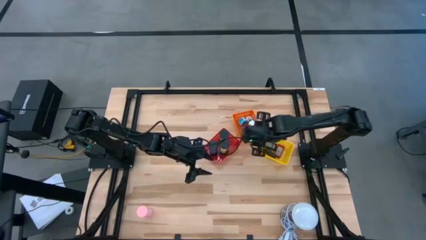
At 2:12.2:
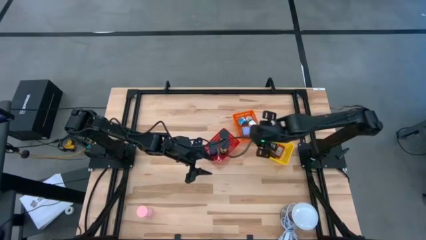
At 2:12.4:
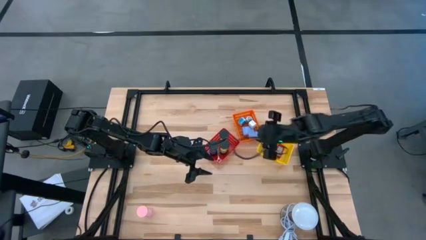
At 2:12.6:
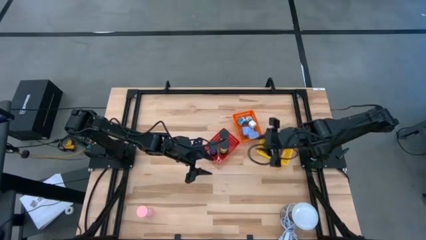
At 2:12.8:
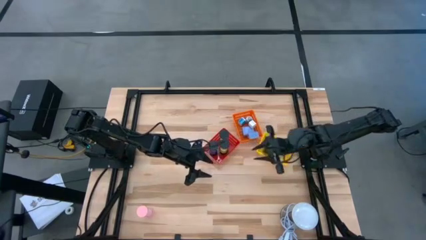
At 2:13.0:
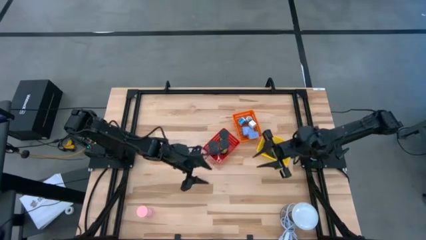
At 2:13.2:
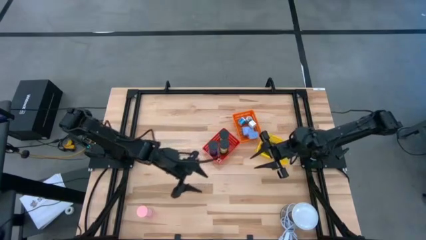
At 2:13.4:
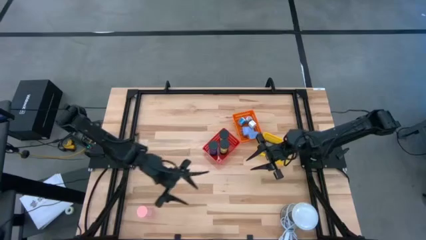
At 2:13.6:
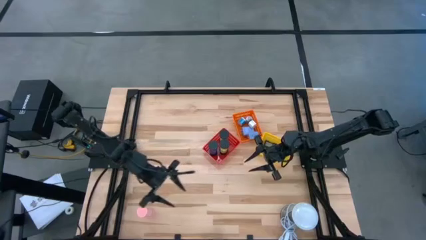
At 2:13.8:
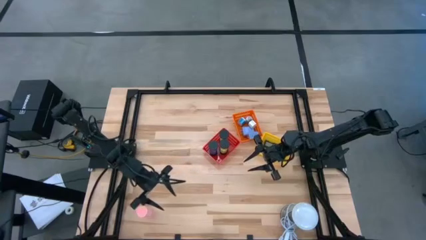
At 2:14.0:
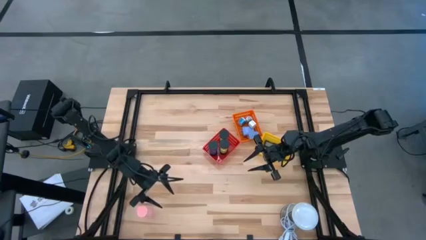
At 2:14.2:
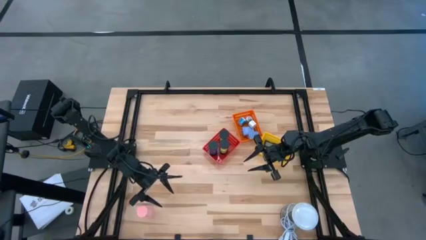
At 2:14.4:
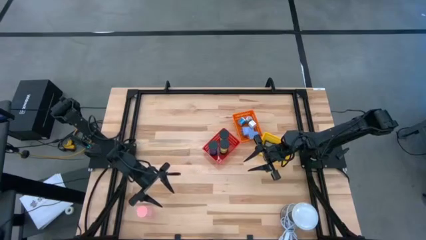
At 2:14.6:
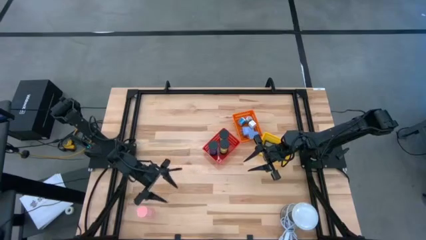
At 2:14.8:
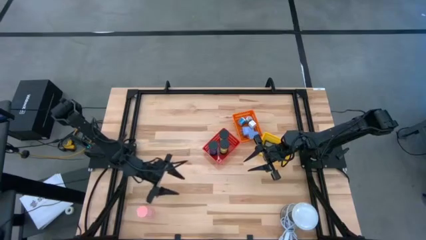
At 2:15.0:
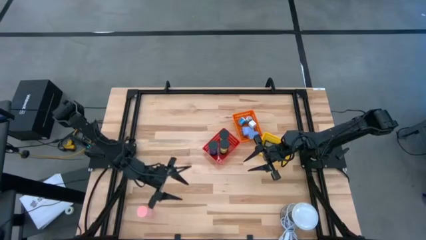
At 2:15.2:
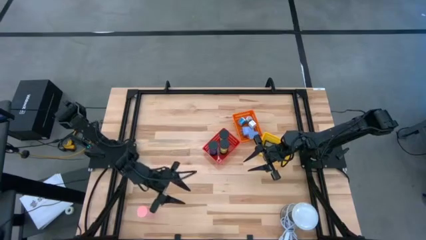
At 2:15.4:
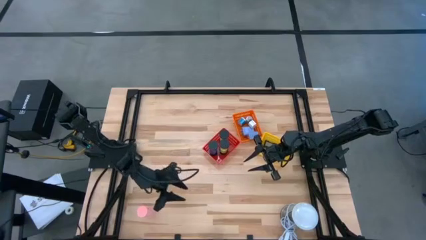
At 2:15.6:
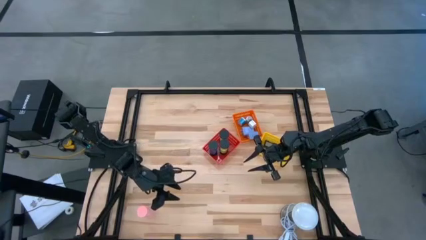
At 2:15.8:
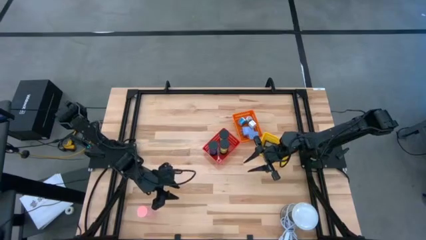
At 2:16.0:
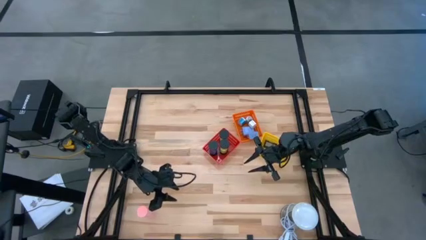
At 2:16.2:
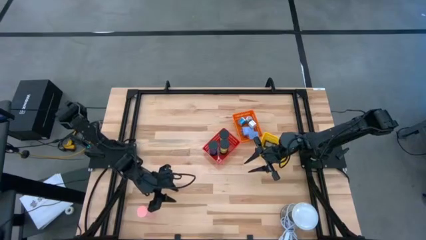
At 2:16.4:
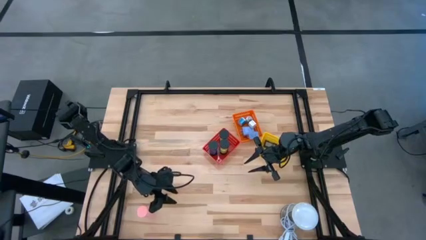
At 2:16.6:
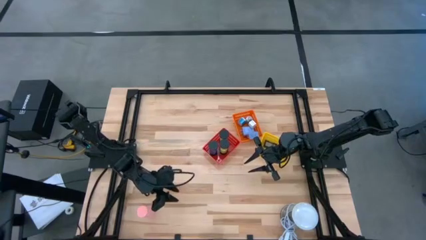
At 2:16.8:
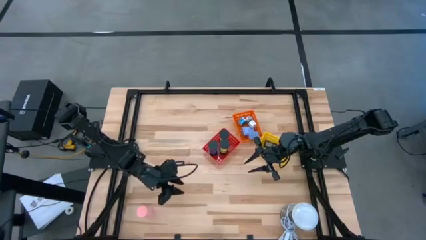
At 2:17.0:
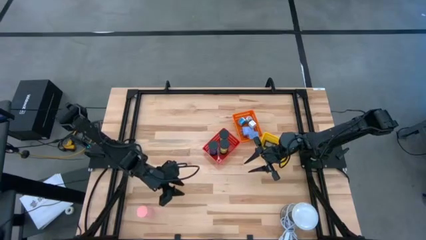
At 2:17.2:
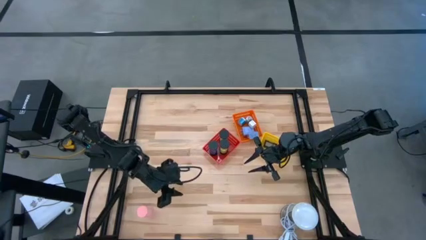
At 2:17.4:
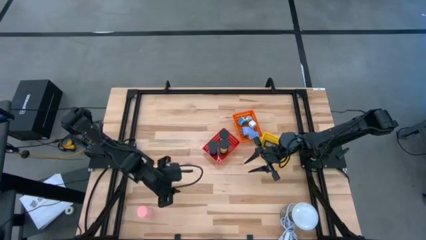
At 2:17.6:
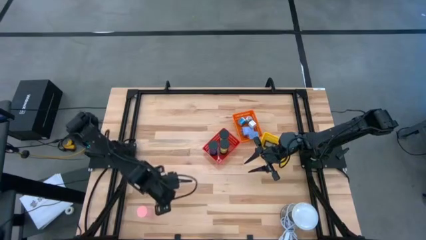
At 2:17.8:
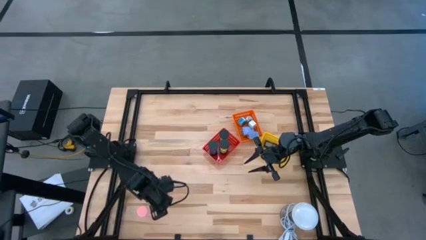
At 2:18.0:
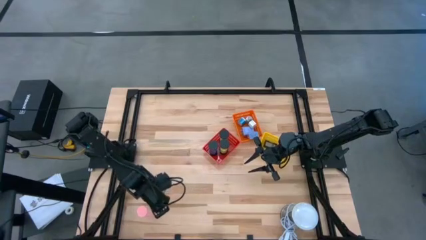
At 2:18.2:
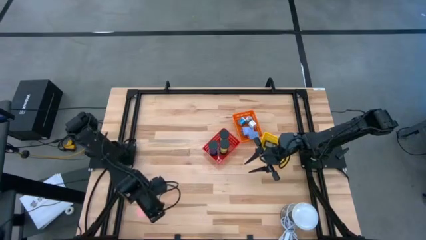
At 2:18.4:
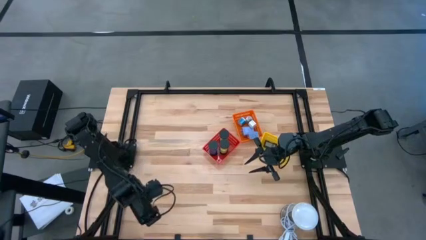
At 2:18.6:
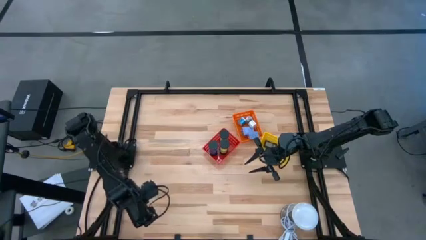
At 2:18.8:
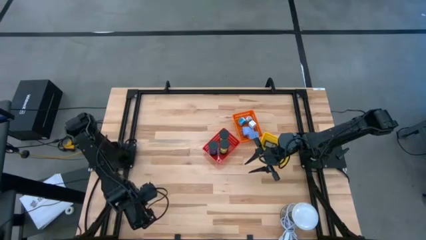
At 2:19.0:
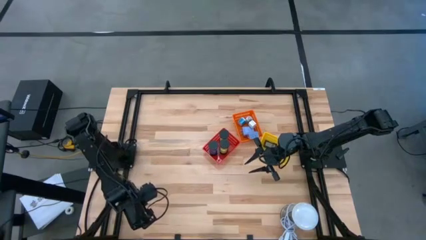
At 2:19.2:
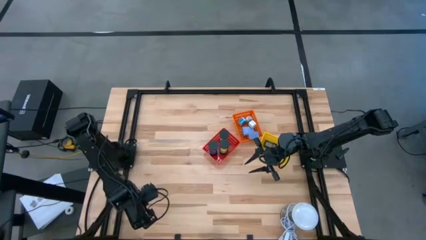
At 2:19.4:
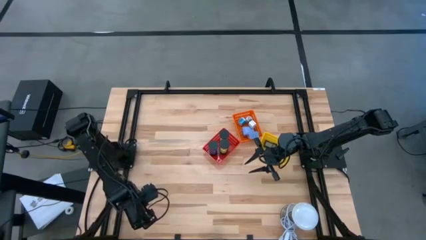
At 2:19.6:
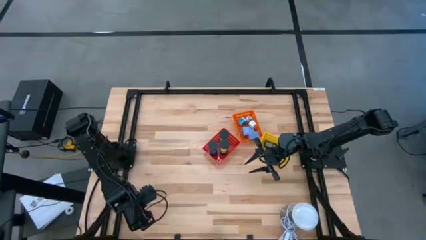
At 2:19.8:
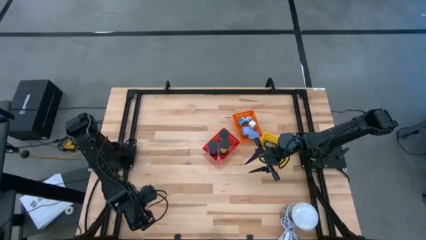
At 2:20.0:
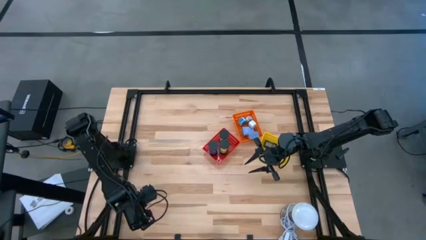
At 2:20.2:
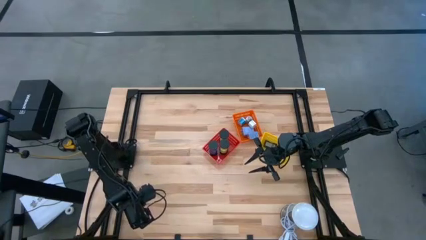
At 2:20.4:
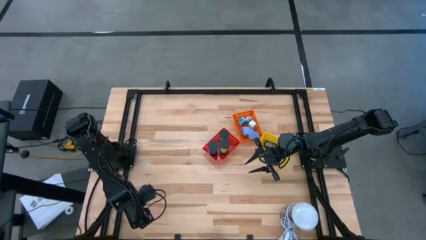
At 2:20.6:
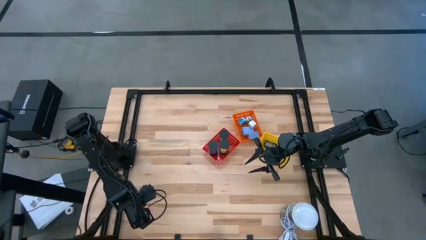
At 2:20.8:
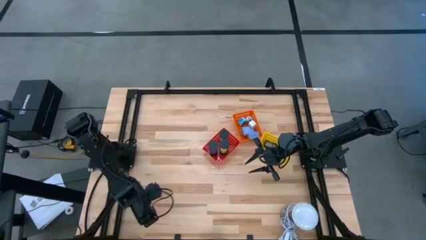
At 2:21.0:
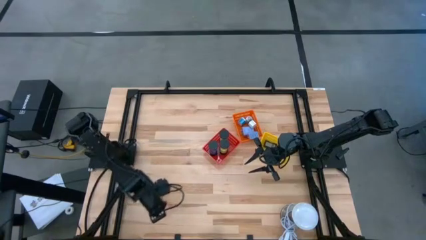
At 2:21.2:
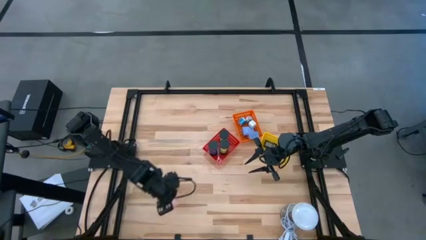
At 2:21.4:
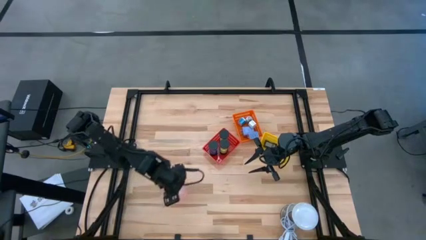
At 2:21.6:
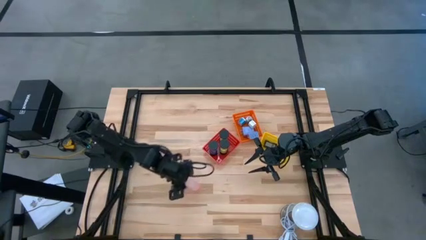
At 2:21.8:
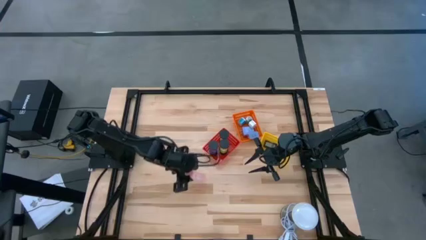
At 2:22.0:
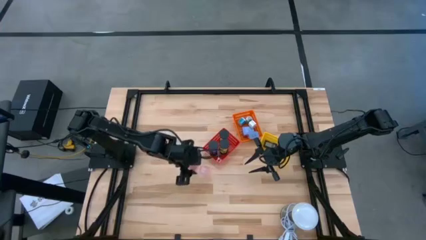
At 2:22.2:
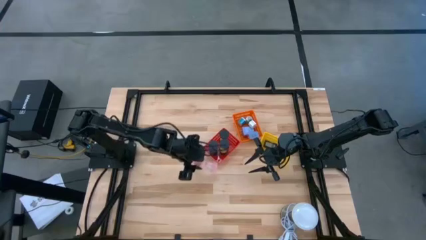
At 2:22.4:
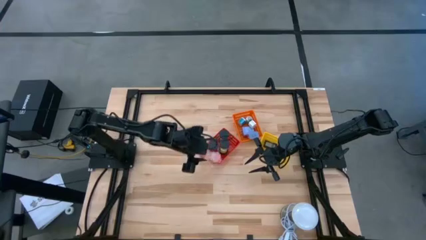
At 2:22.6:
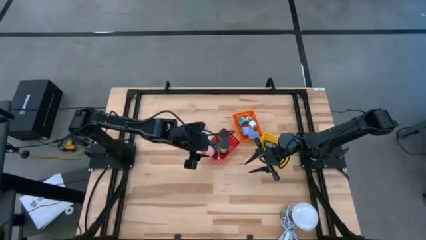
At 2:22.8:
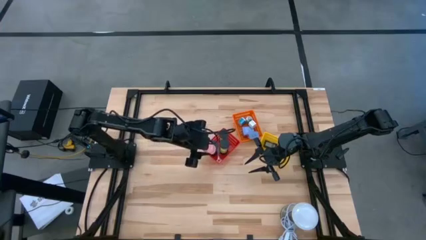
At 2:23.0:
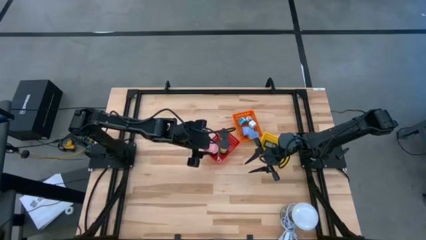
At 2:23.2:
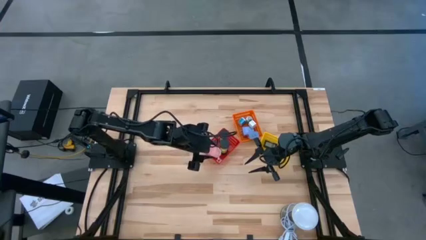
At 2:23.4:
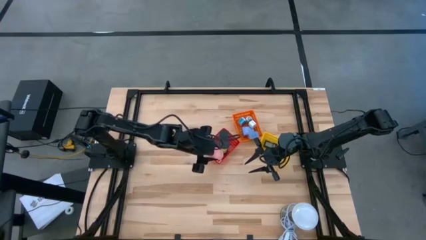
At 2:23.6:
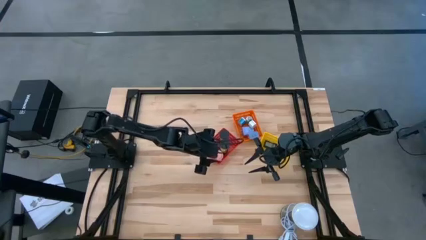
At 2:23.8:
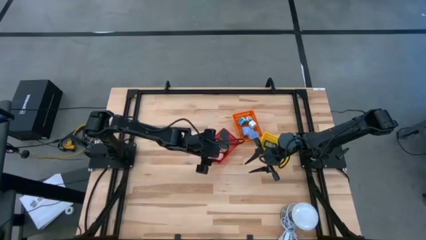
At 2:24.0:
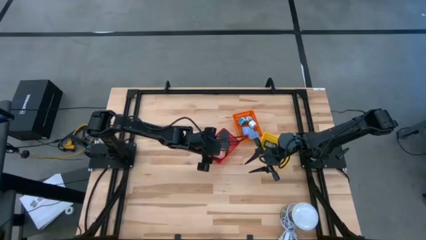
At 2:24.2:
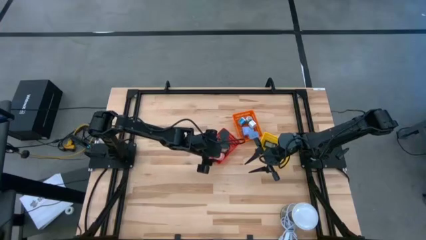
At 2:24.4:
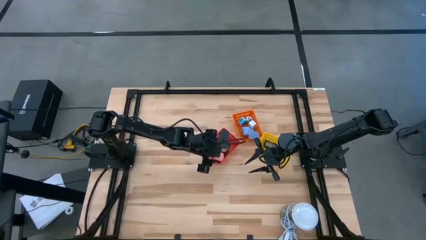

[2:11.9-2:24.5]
Task: Pick & Place Office items
Put the pink hourglass into the red bin

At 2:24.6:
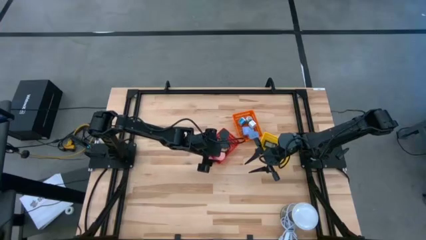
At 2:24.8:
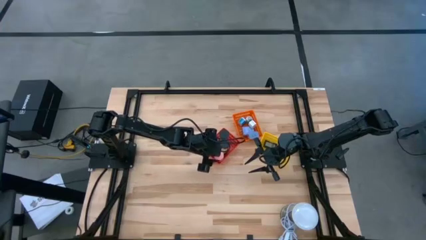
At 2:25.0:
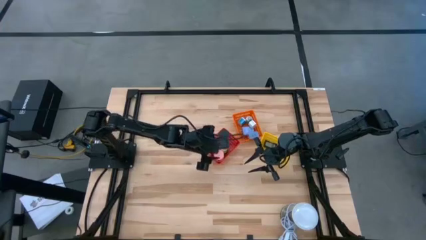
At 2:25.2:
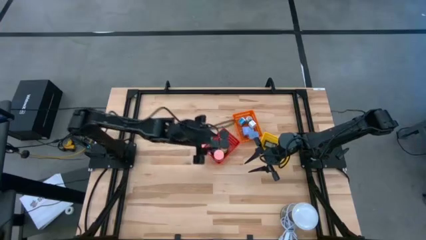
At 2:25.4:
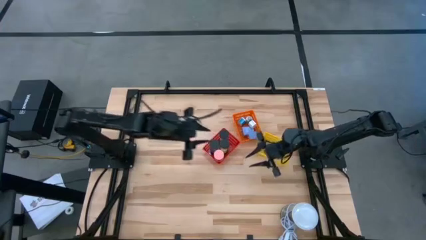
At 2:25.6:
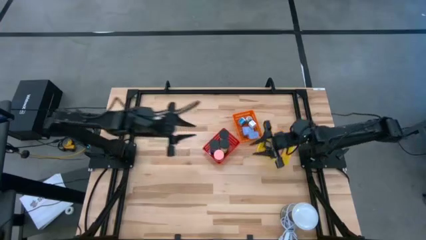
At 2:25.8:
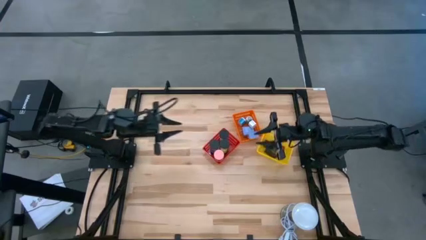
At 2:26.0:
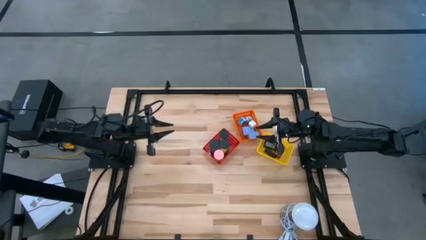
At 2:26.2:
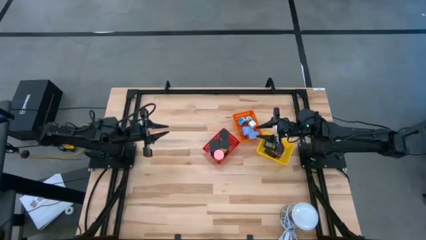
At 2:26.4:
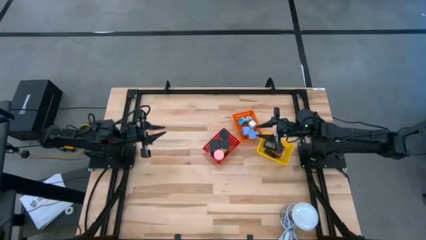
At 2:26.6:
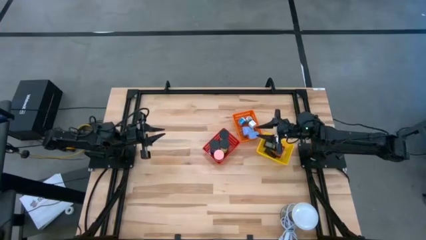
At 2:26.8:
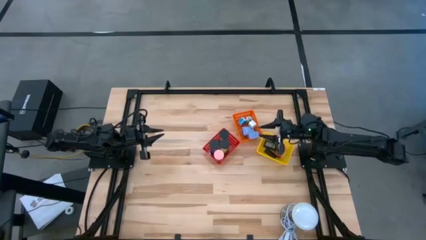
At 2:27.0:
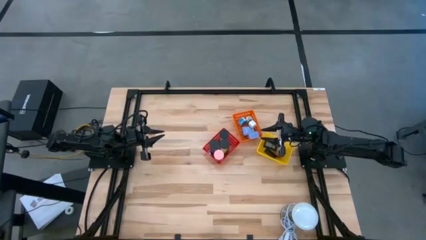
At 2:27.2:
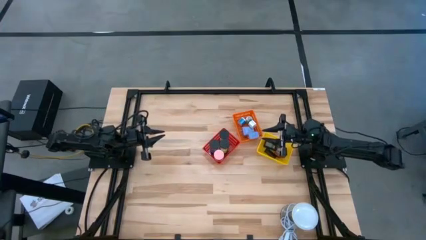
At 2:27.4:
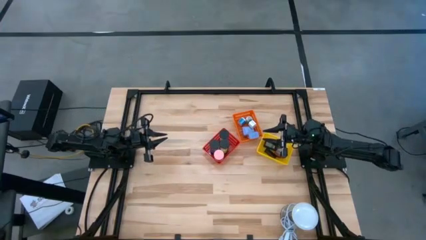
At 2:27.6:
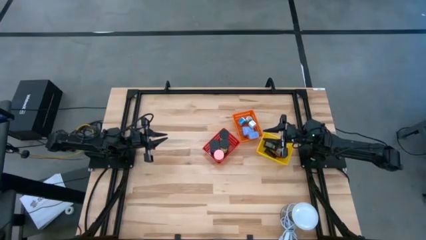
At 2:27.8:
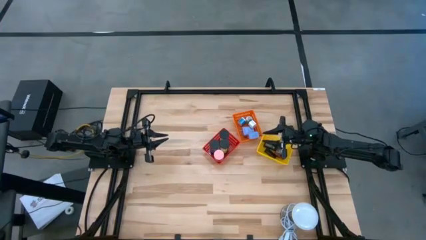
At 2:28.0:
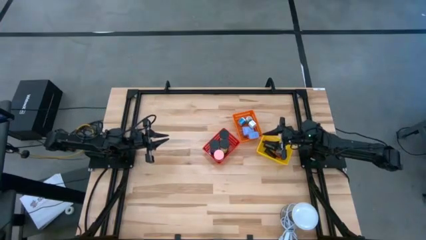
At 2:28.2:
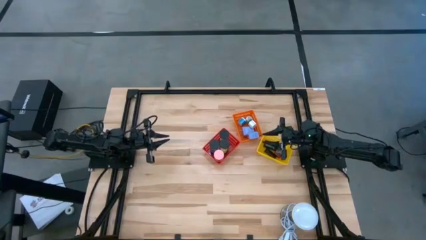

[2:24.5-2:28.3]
Return to home position
